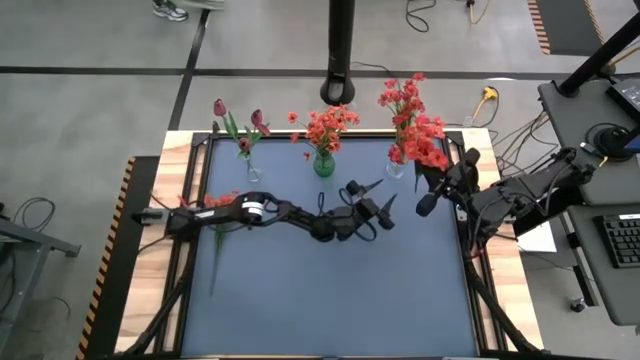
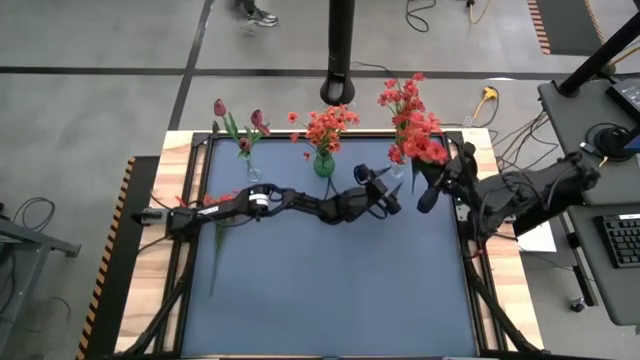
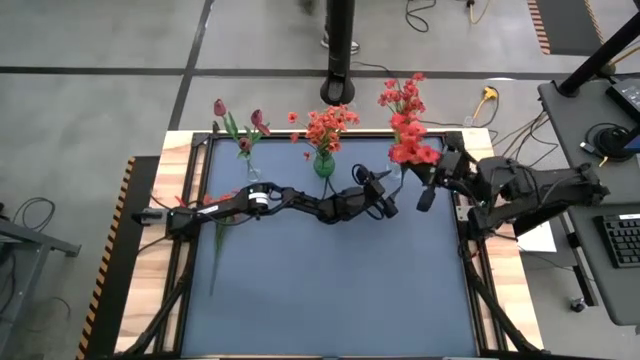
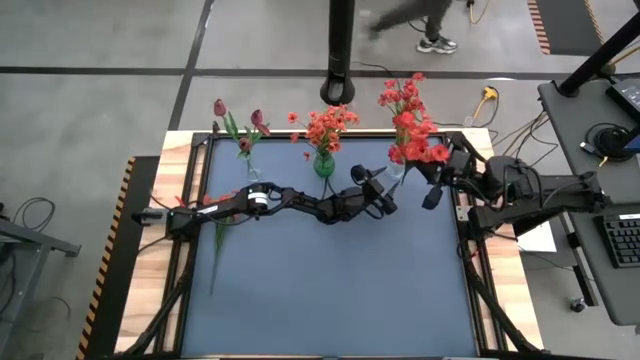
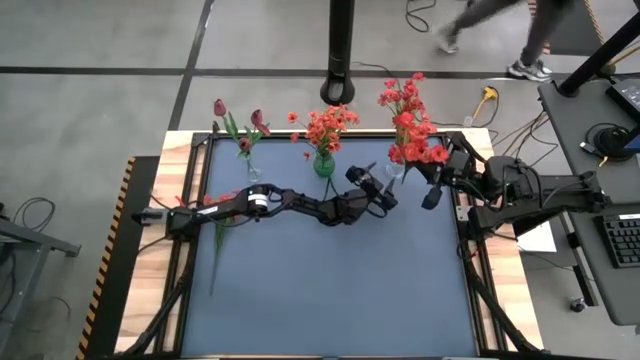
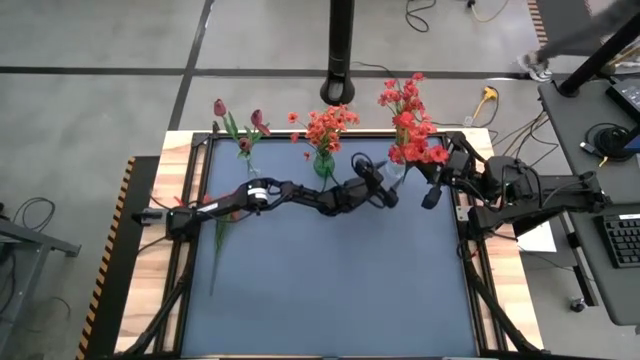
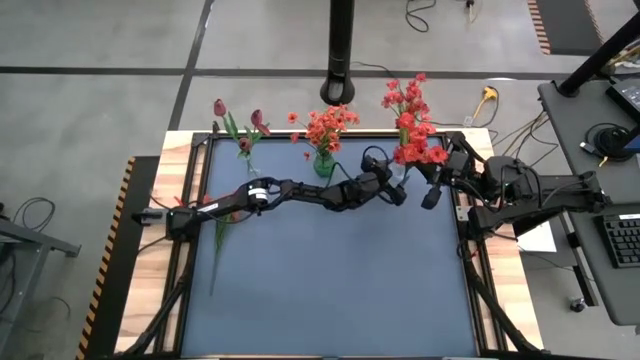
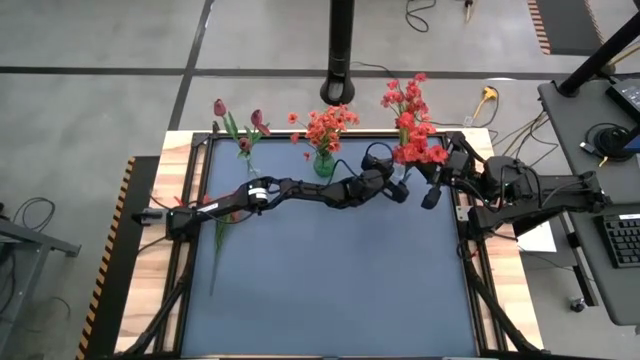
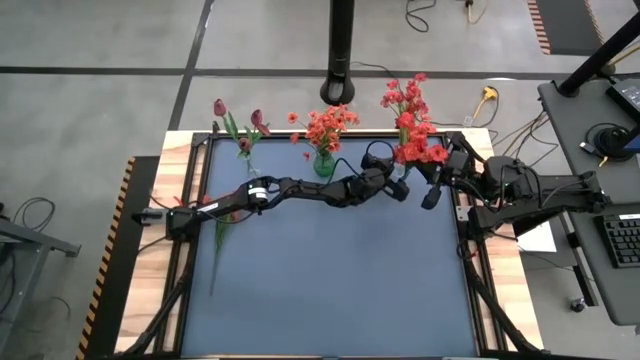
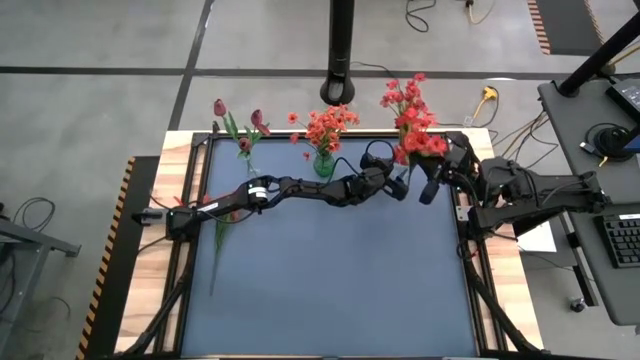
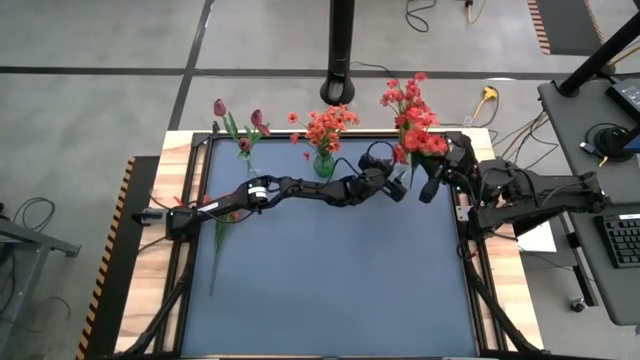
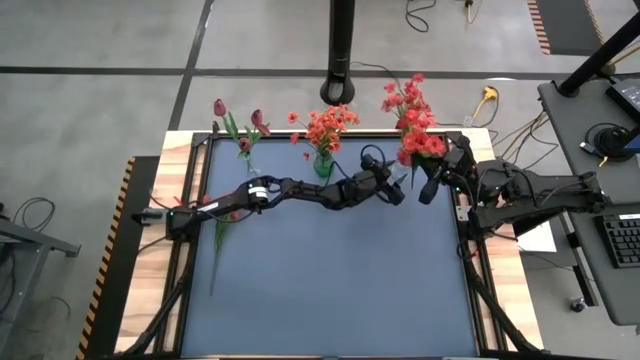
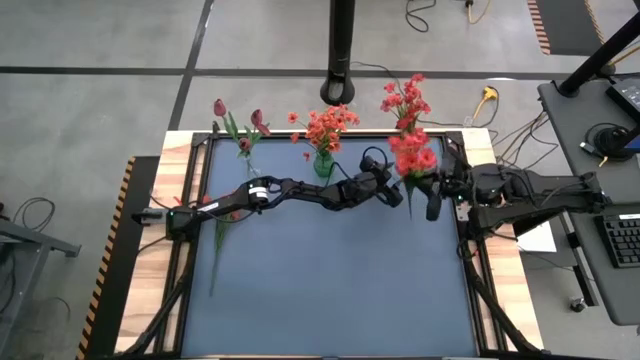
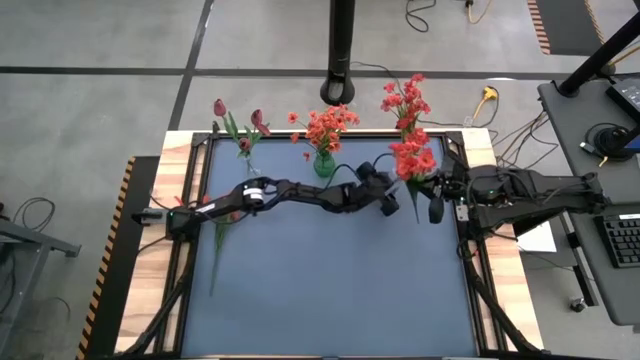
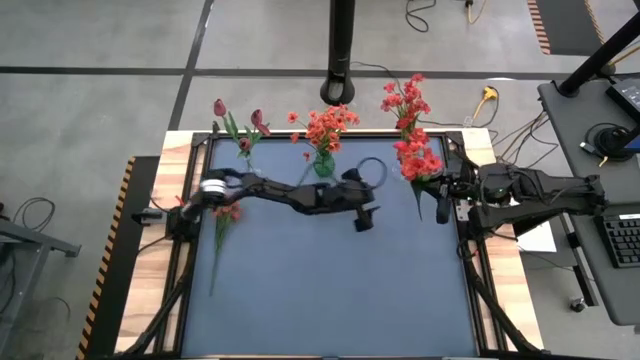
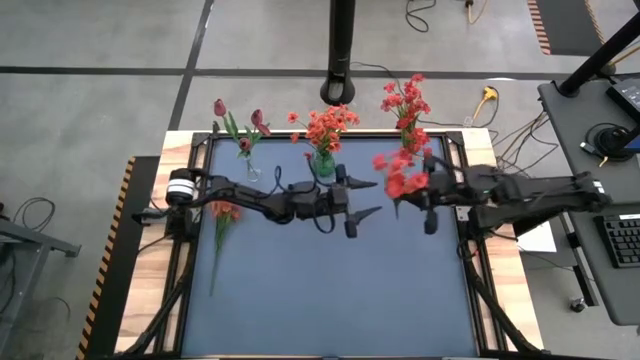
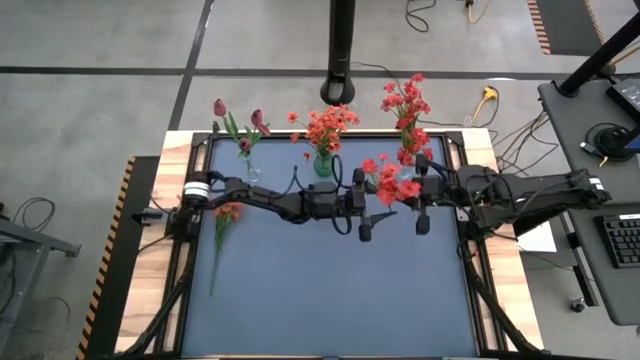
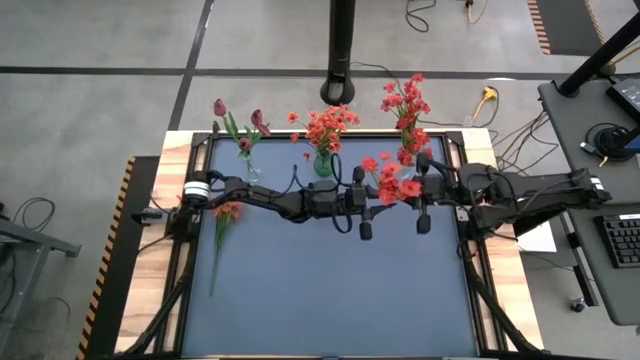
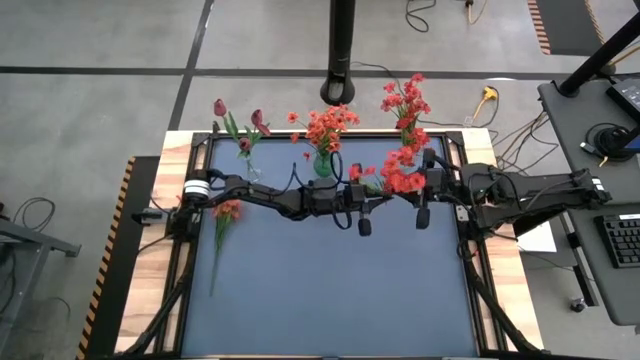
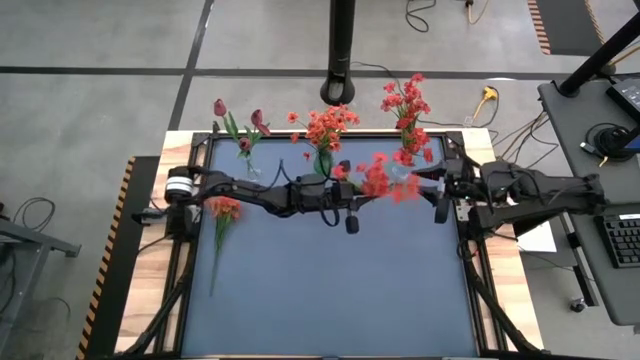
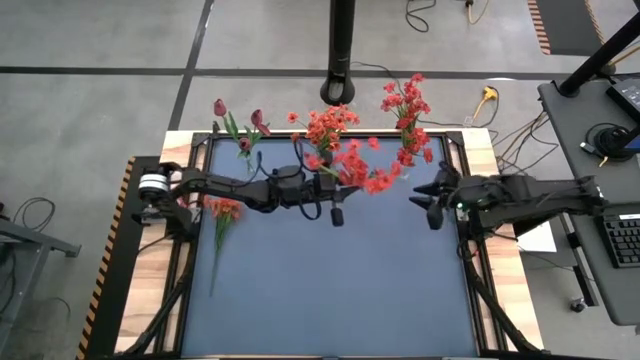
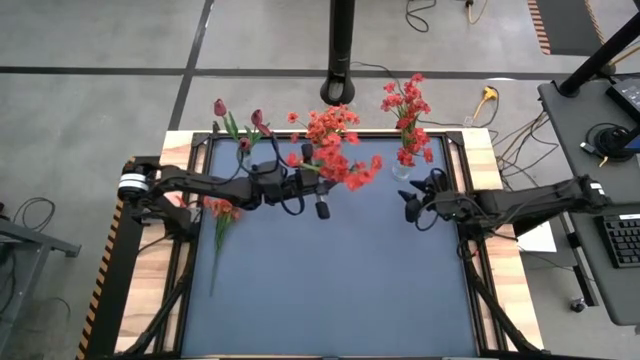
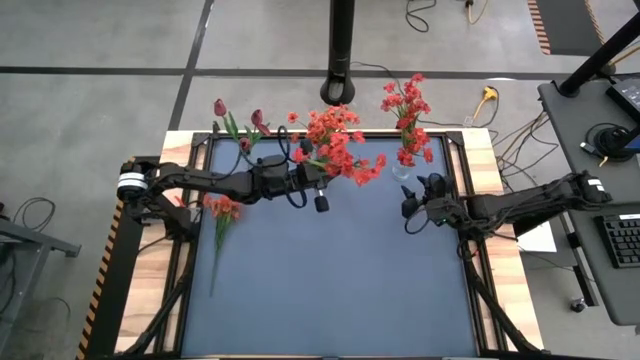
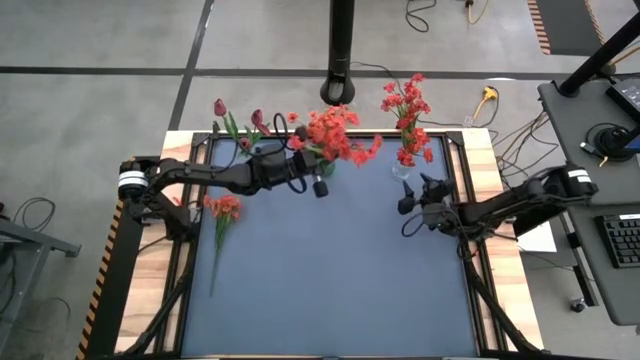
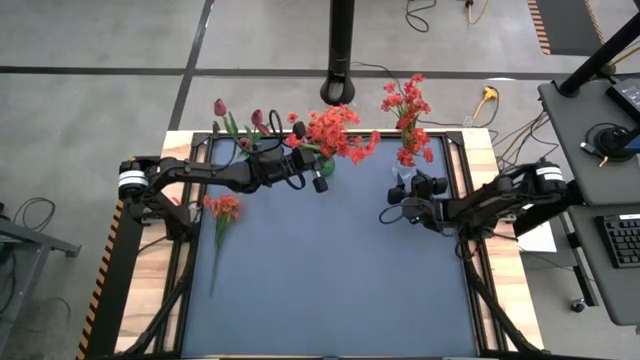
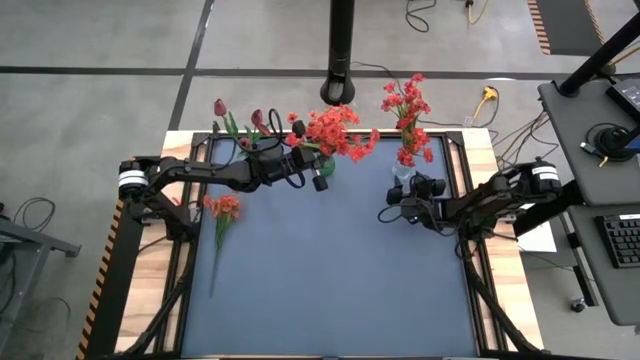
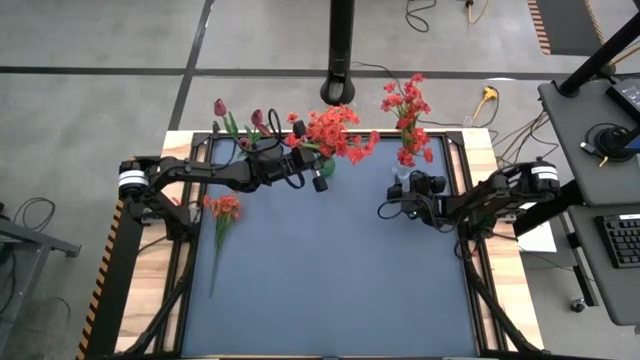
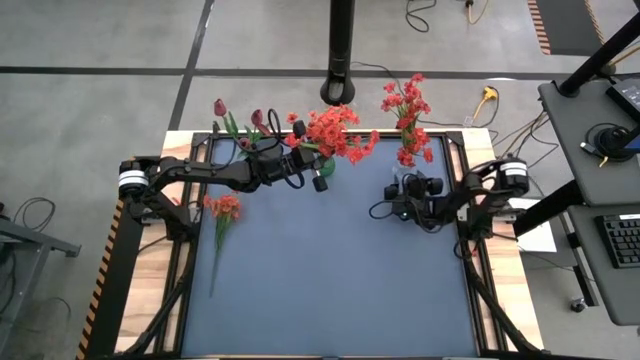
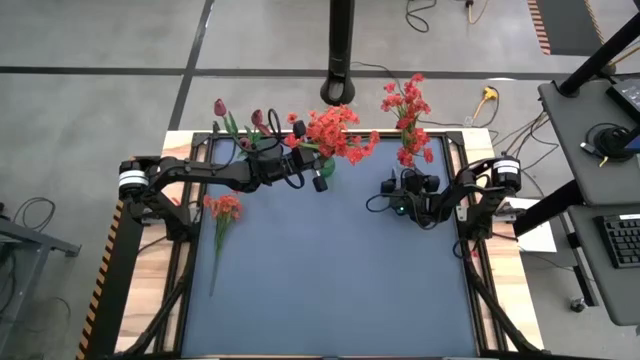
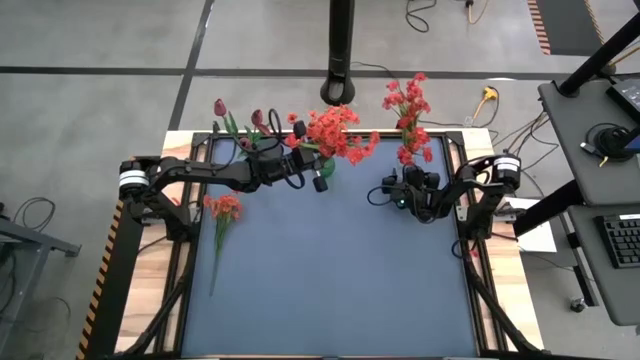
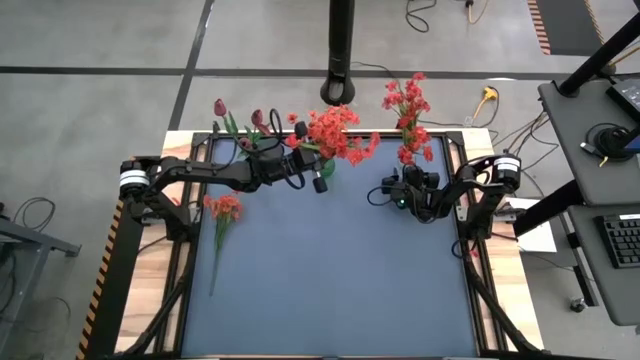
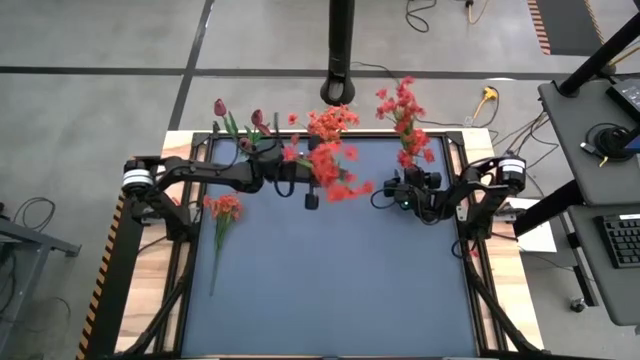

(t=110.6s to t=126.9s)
Task: Sort flowers into vase by color
Put the red flowers into the right transparent vase

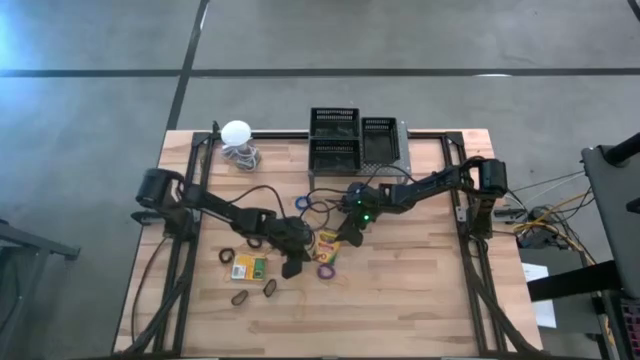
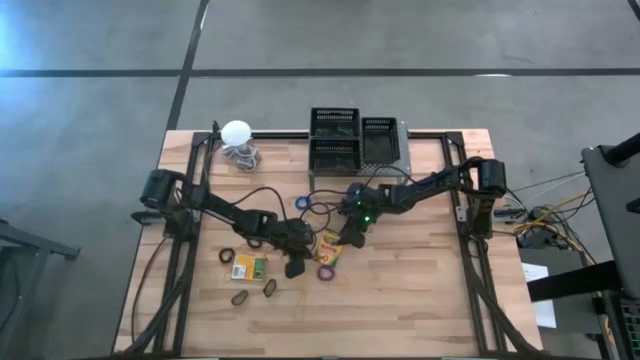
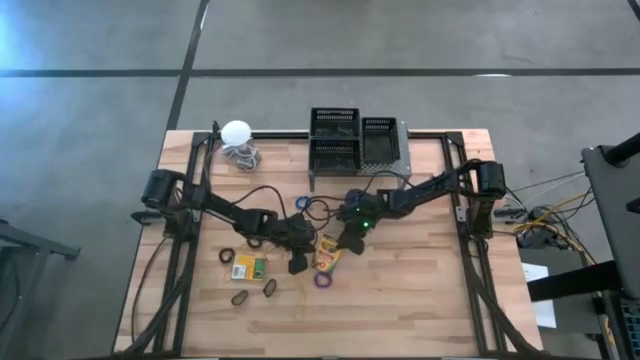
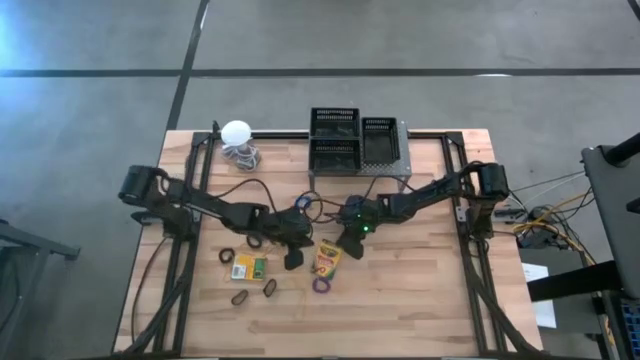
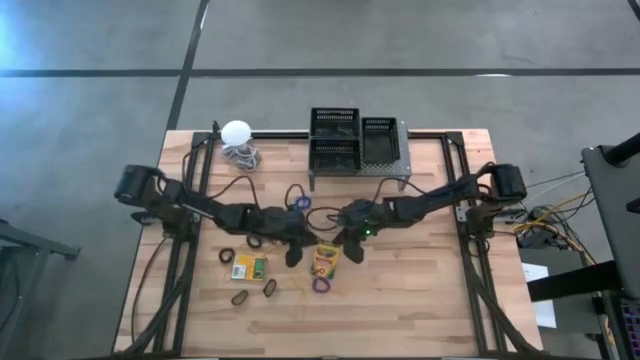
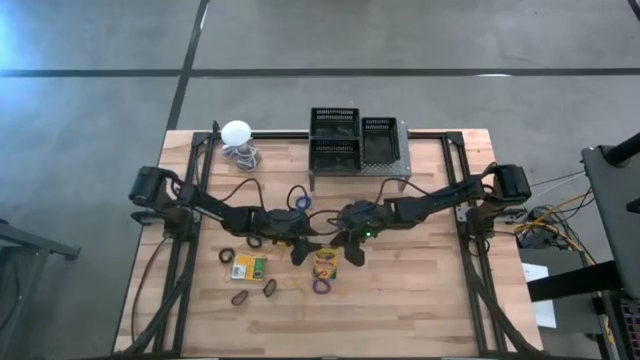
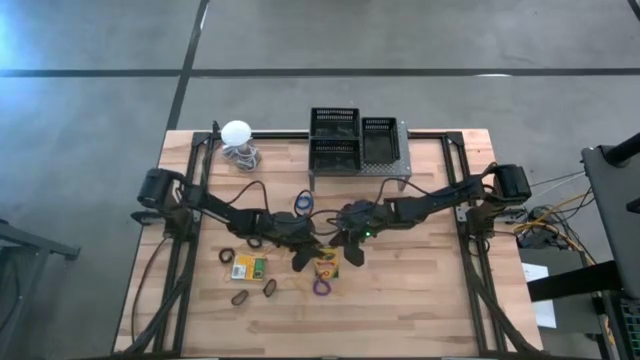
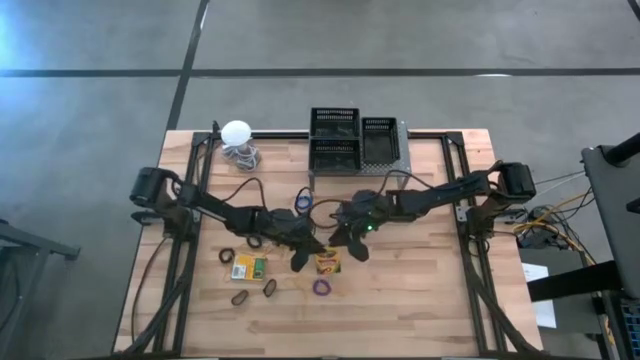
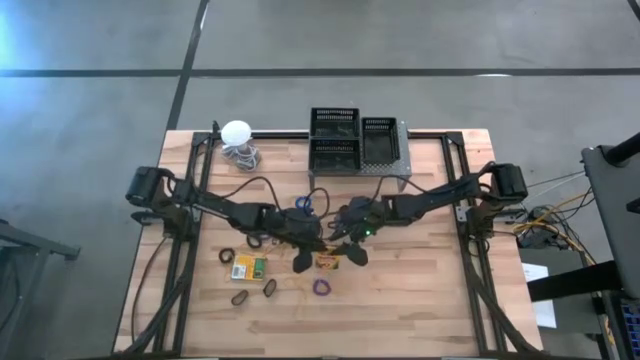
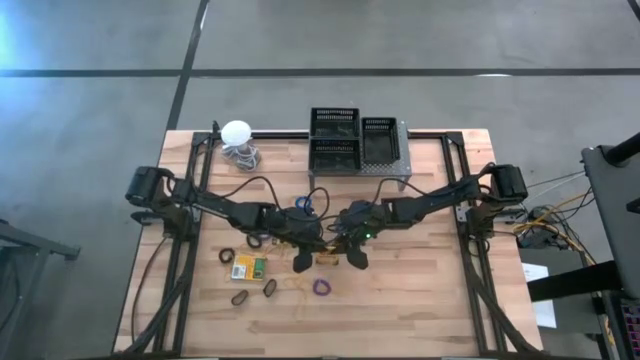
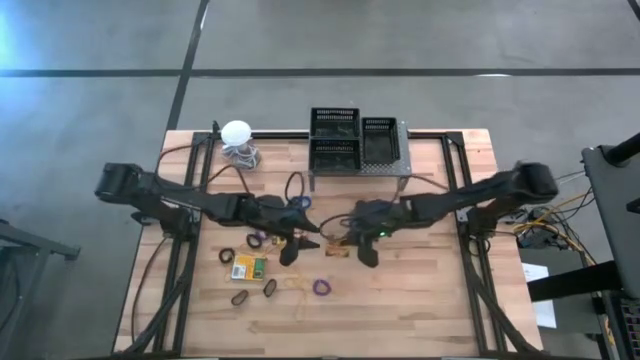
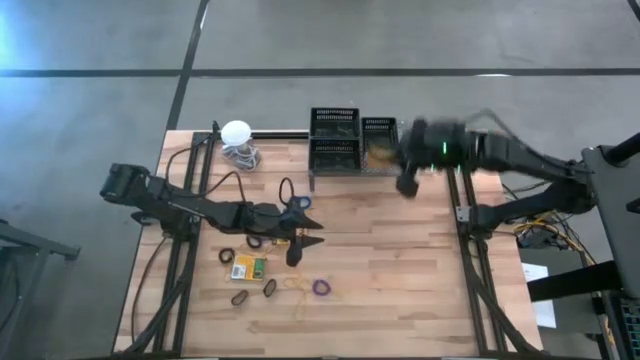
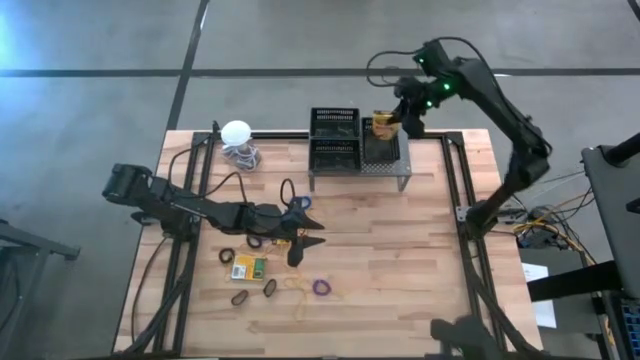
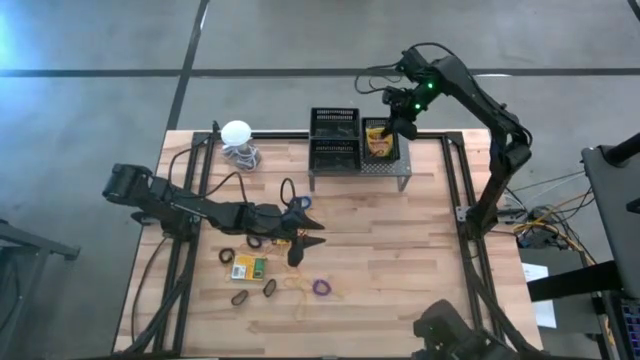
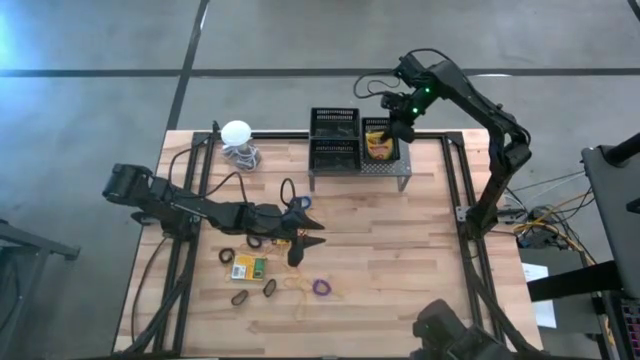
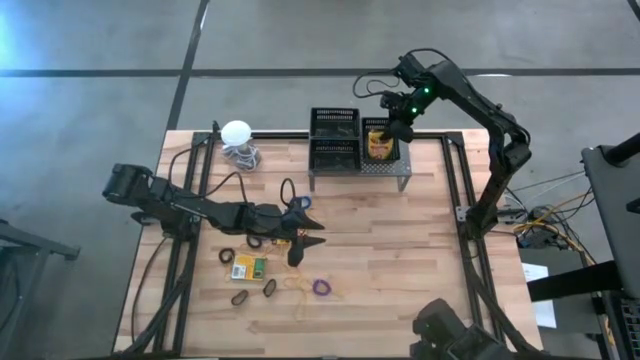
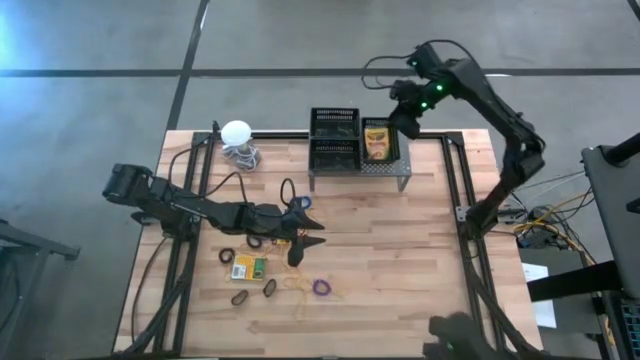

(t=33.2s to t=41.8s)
Task: Pick & Place Office Desk Supplies
Put the bottom right yellow crayon box into the right black bin on the shelf
